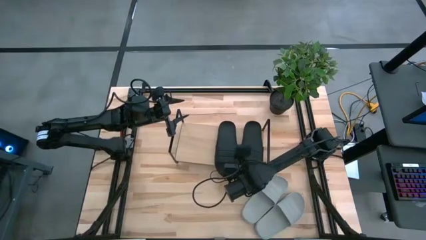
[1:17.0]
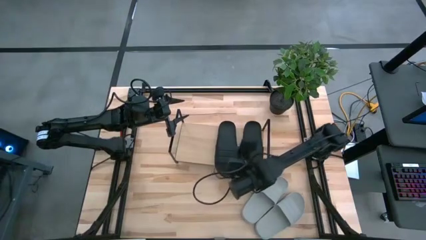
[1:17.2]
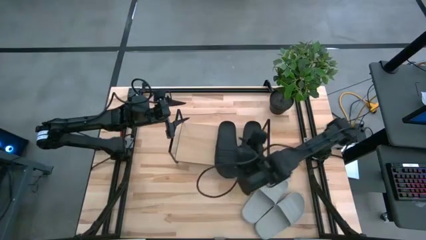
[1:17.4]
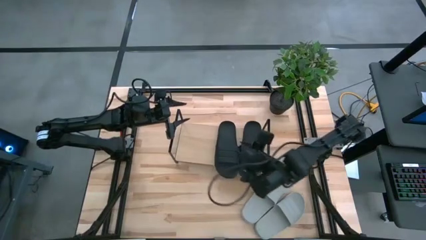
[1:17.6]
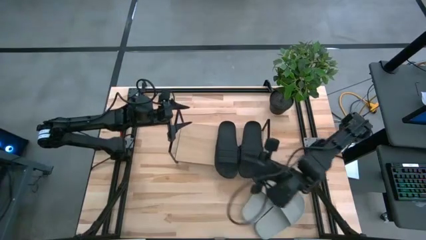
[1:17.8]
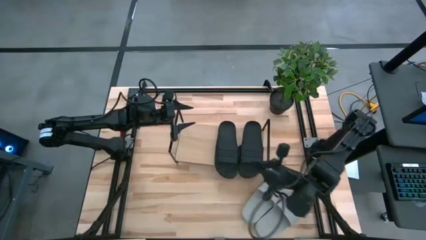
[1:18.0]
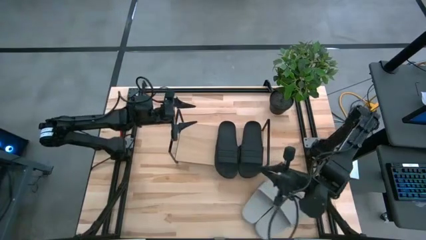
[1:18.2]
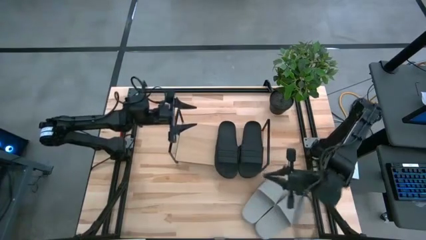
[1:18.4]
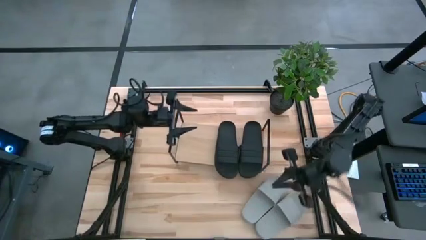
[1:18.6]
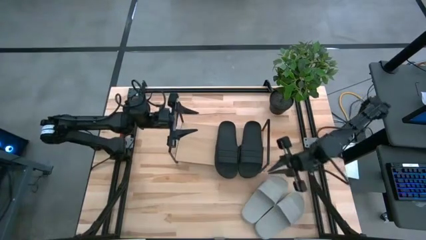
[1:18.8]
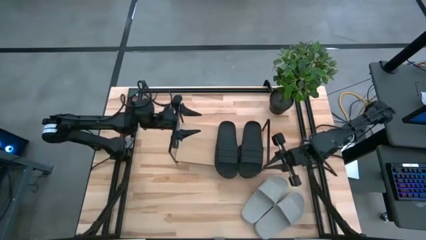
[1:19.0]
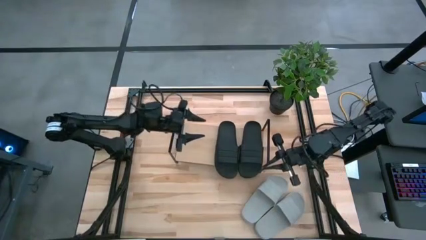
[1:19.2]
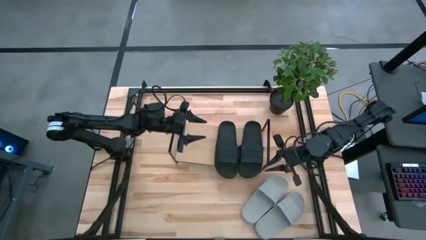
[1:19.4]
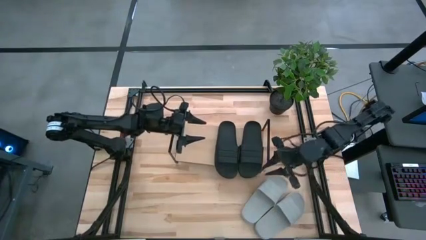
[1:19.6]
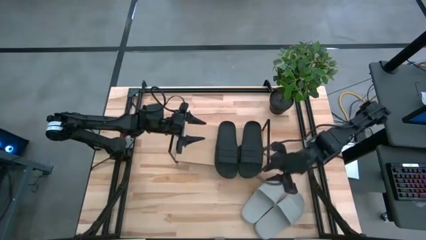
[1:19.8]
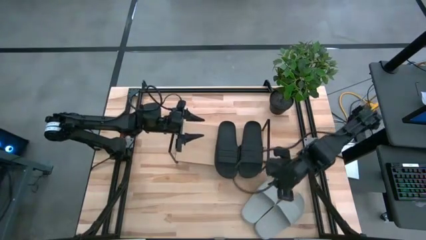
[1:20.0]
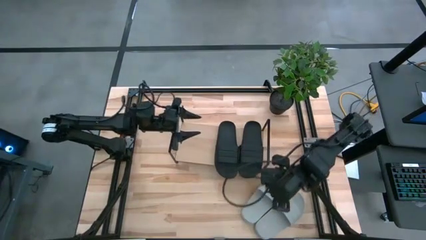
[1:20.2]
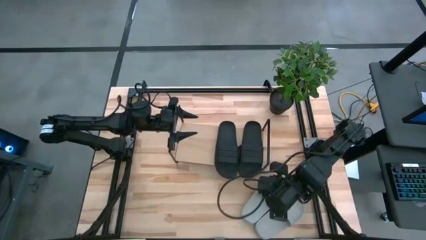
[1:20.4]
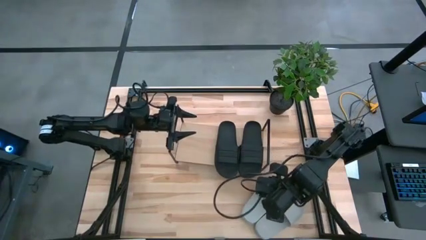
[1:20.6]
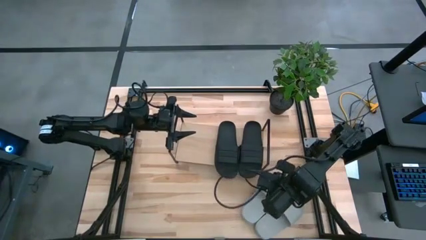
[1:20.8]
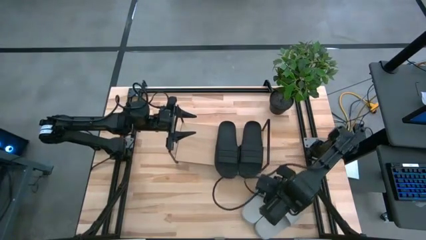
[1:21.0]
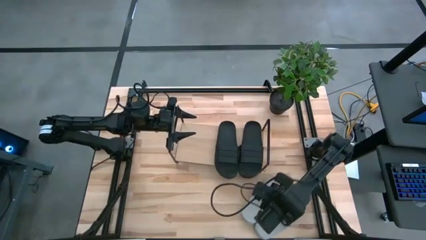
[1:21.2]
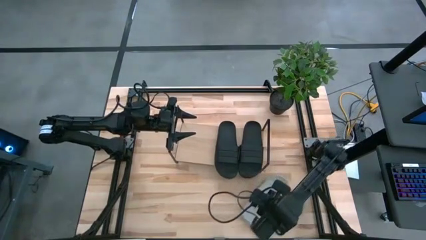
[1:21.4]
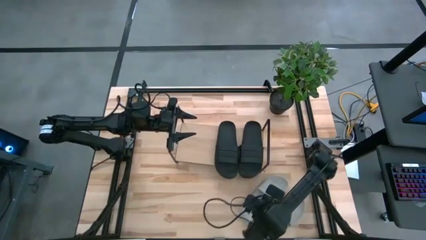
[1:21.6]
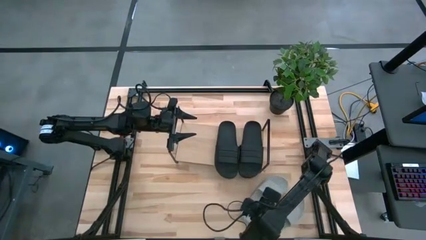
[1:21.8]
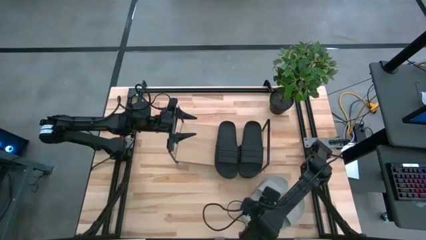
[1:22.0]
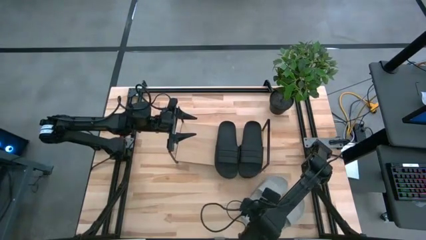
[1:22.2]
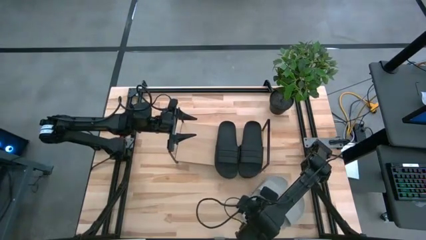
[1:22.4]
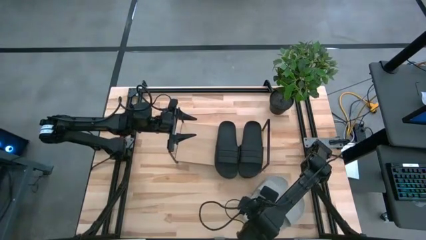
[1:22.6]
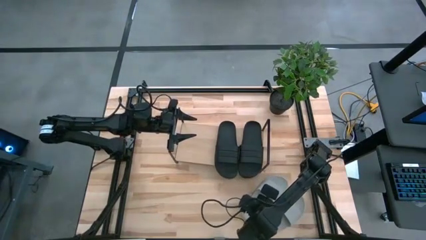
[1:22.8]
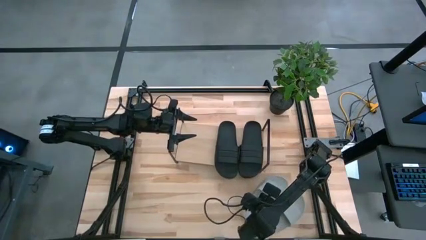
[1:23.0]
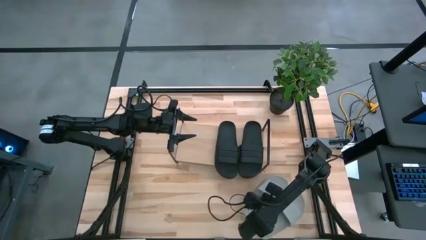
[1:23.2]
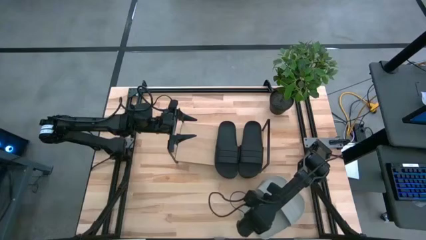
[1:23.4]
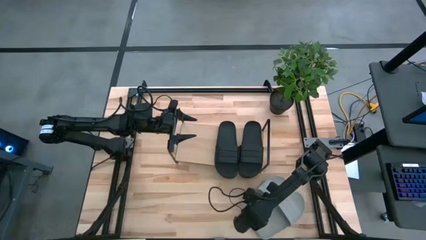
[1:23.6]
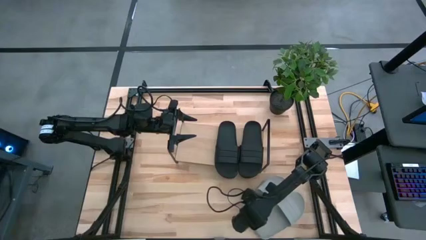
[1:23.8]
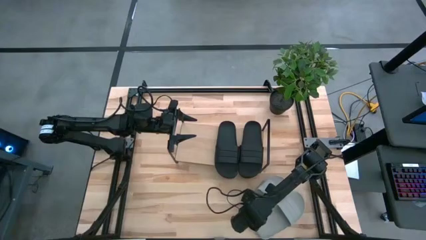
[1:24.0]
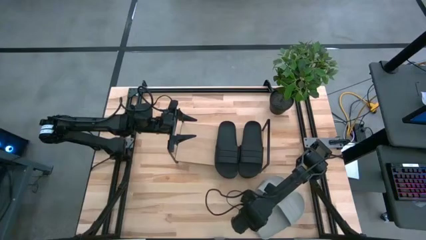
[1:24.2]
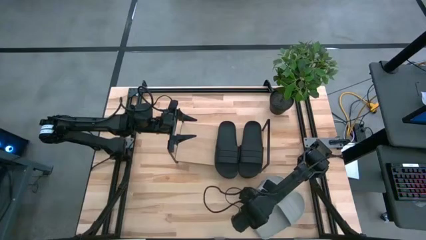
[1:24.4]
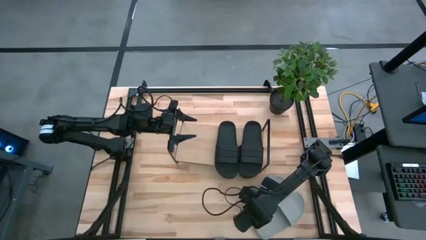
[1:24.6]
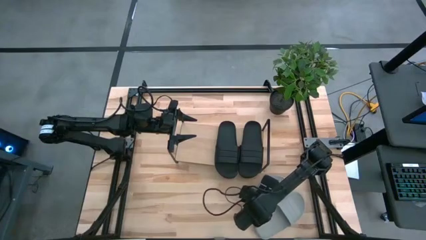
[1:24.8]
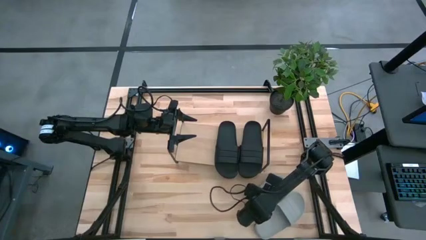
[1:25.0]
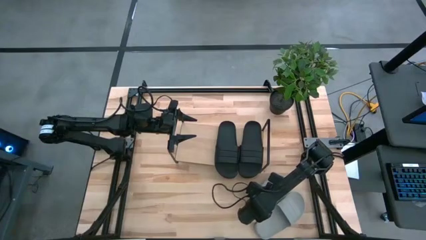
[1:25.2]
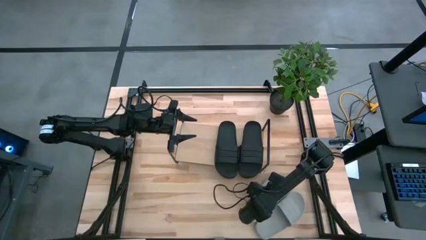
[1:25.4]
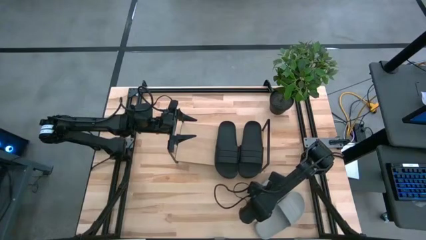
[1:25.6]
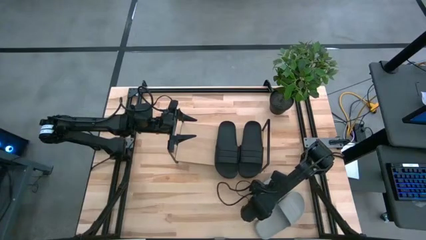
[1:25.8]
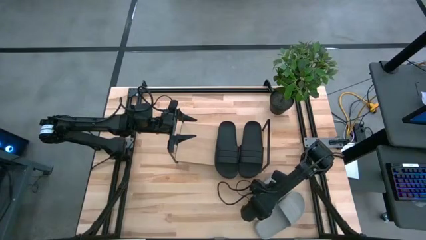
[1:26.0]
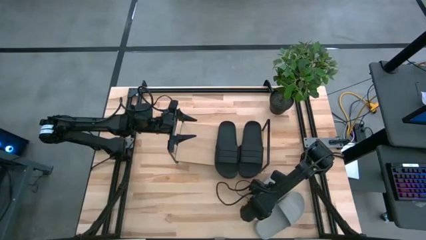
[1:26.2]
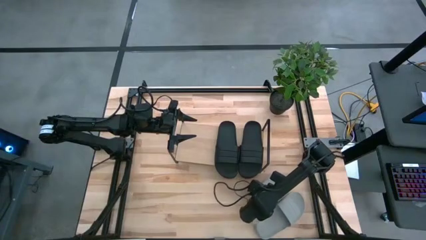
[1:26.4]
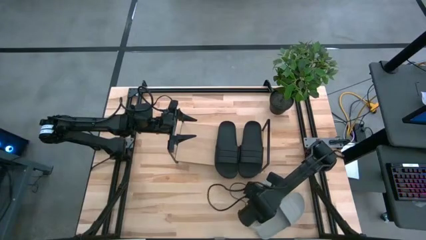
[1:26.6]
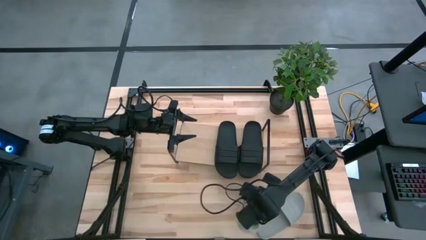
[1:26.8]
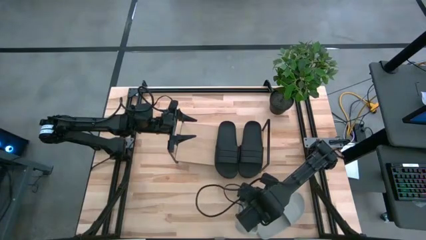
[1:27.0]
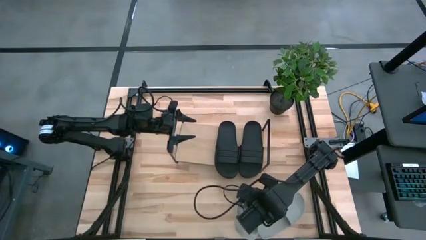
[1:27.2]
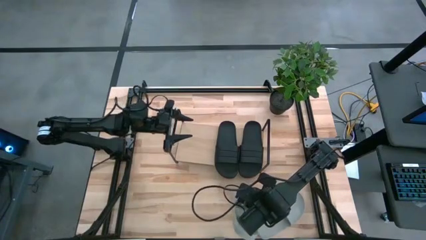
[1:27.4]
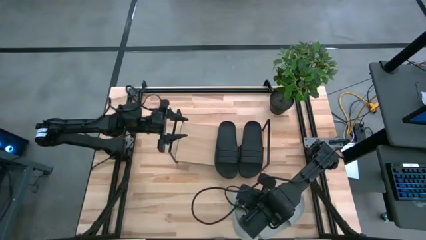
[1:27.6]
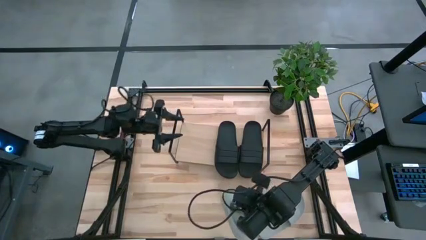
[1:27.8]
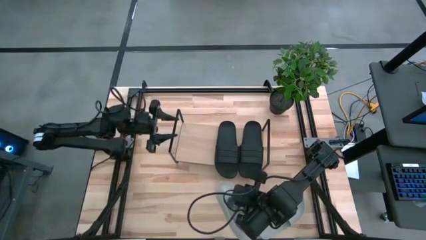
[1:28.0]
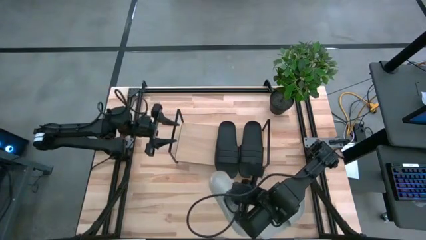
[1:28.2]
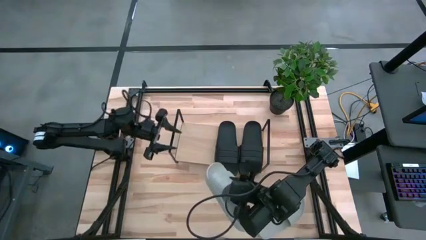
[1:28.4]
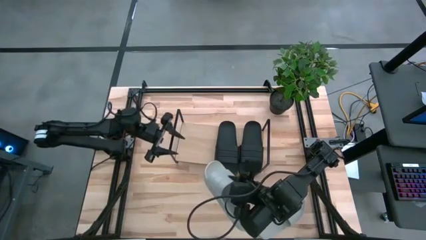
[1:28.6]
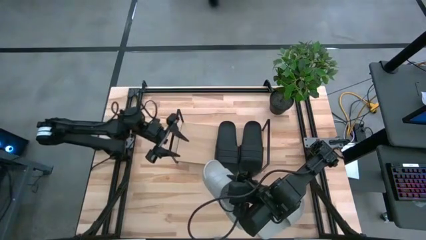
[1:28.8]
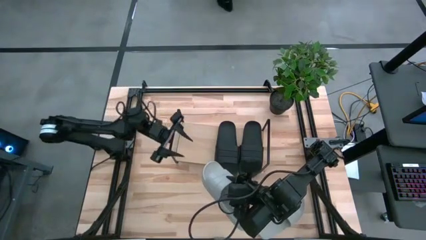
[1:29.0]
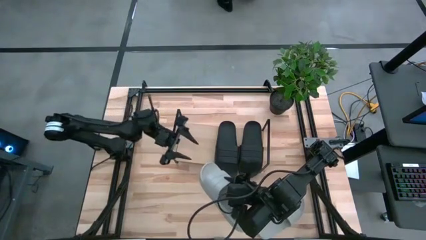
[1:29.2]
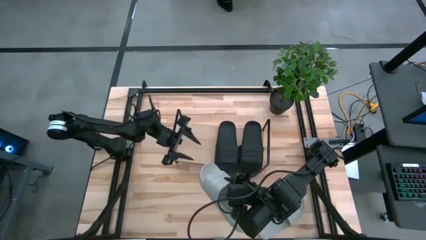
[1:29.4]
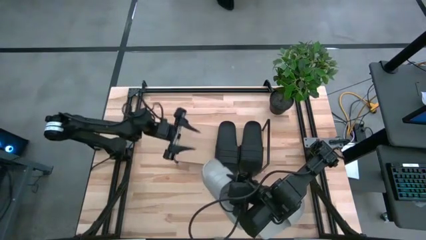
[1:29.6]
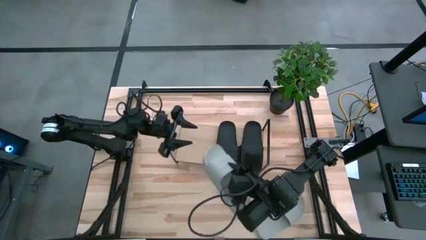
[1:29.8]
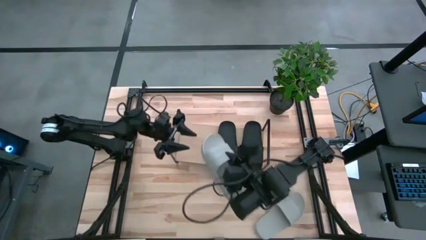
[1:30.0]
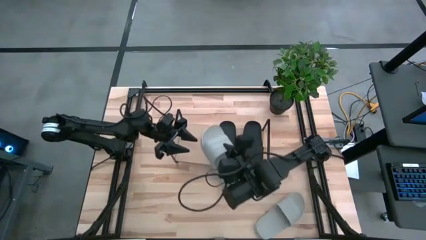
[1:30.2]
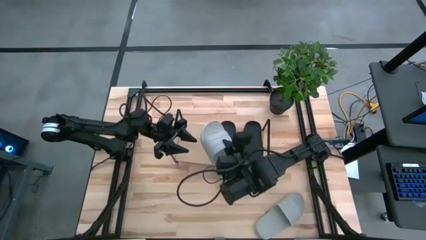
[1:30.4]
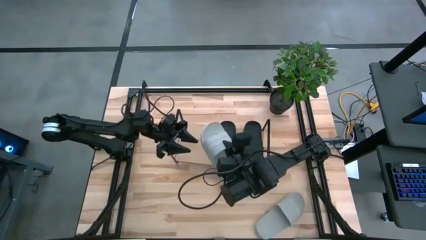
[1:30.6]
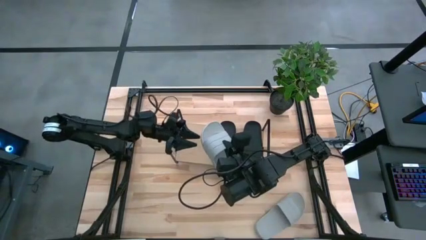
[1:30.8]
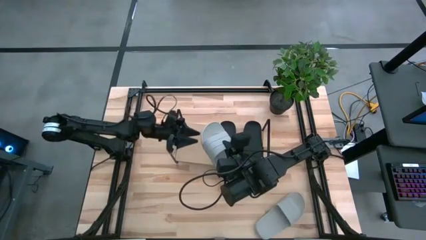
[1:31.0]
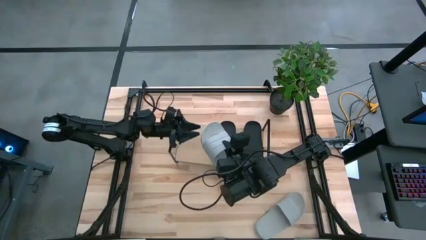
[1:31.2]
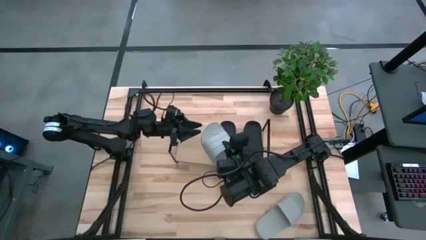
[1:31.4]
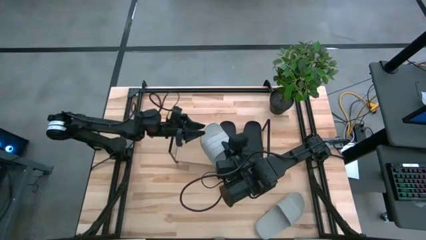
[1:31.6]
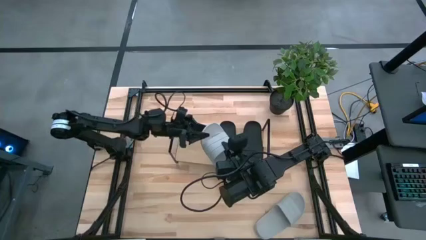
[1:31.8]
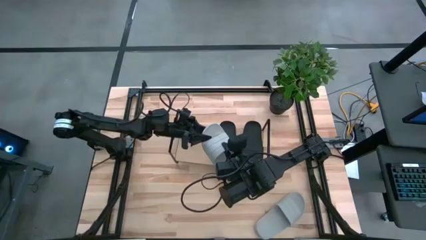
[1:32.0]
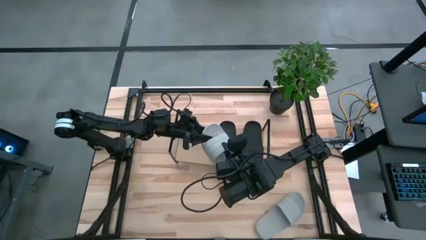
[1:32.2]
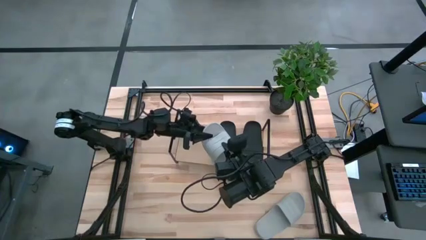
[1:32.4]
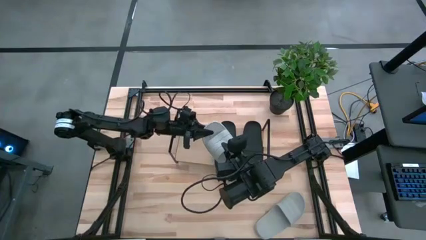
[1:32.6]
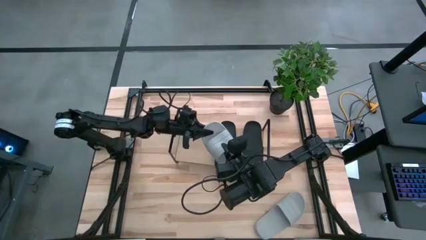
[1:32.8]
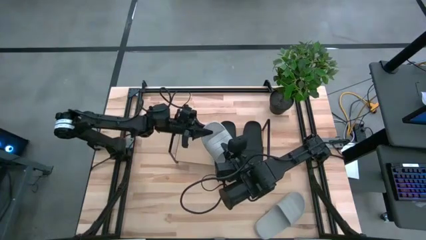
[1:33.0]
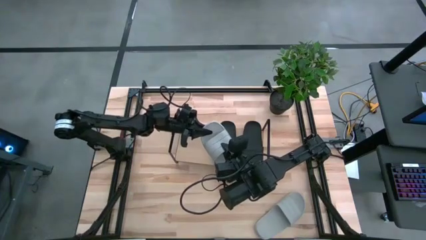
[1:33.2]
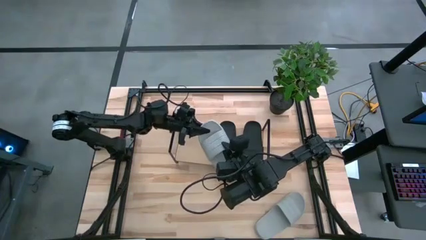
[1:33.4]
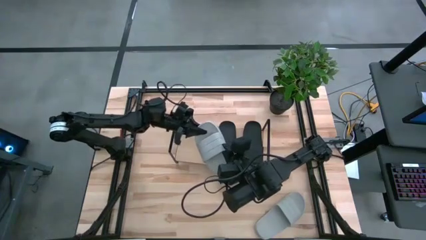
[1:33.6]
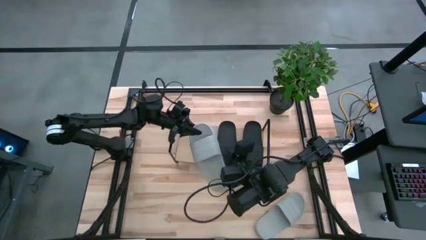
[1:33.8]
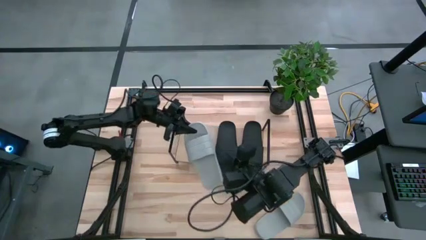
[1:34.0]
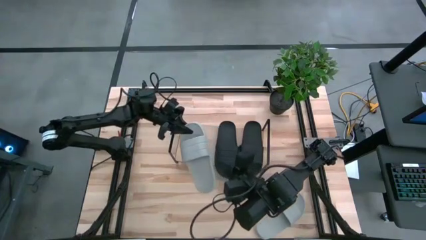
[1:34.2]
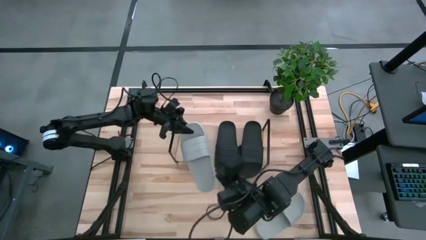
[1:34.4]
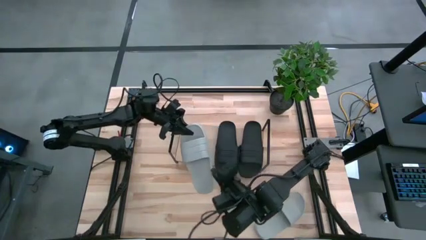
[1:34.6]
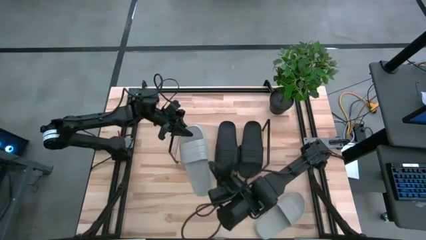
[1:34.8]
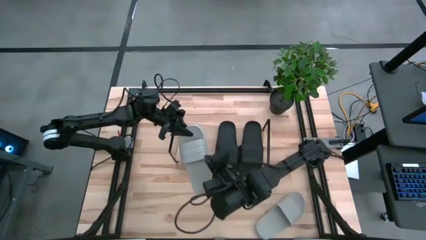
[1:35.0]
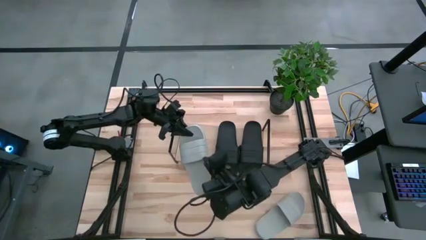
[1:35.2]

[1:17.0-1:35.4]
Task: Pick and place slides into the shelf
Put the left gray slides on the shelf
